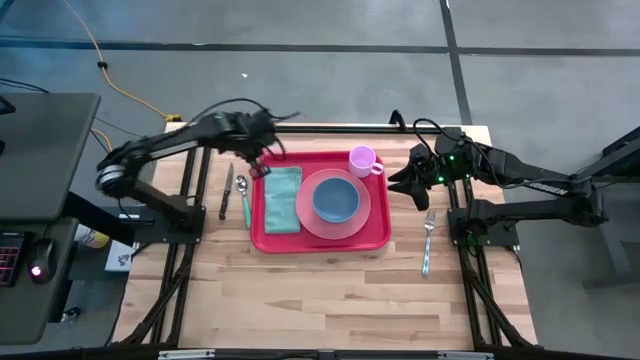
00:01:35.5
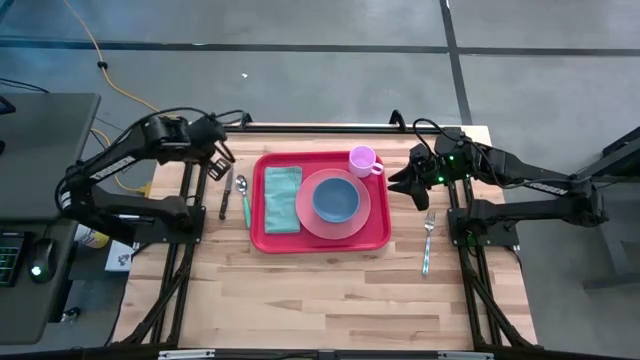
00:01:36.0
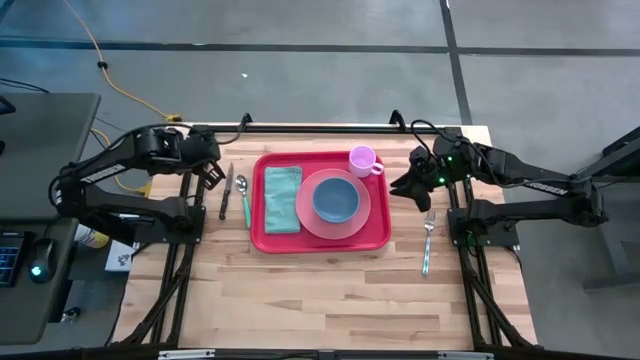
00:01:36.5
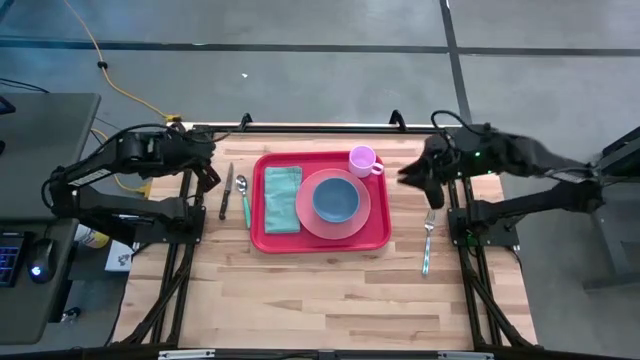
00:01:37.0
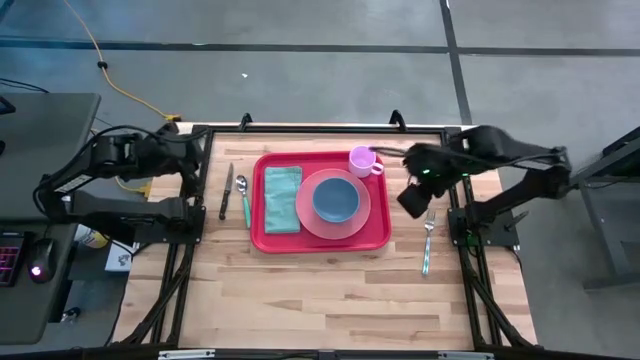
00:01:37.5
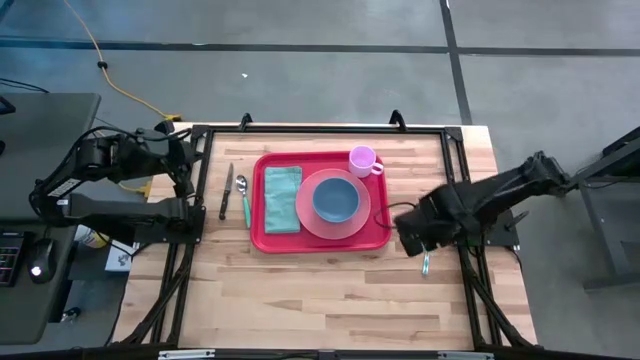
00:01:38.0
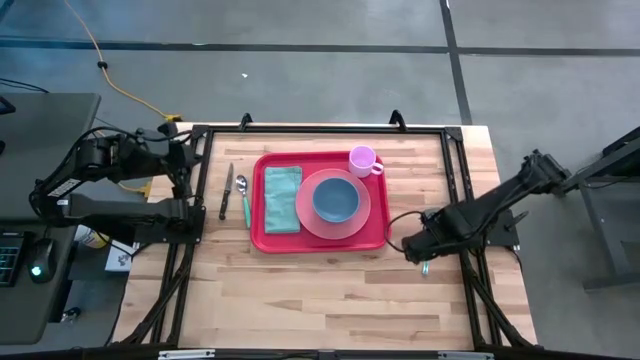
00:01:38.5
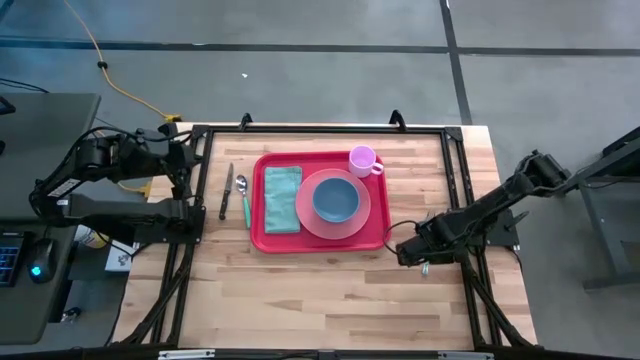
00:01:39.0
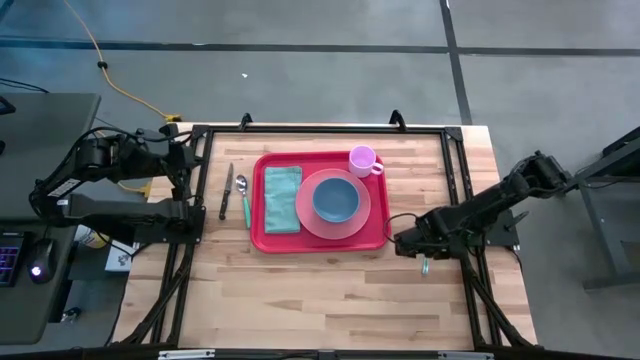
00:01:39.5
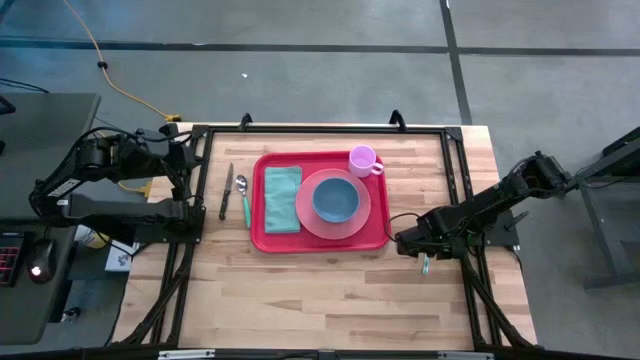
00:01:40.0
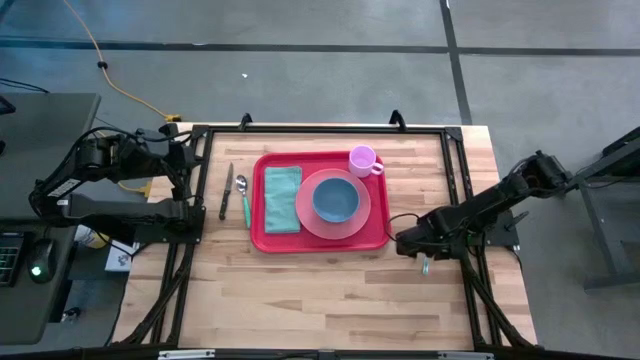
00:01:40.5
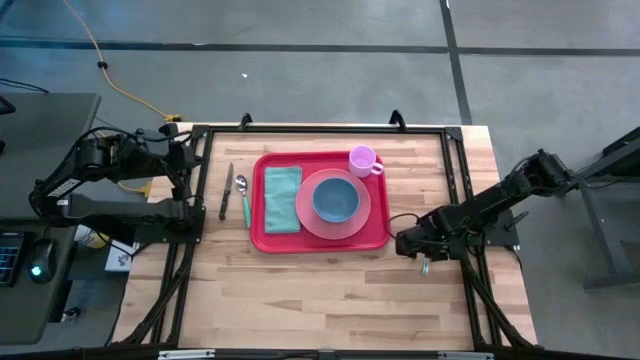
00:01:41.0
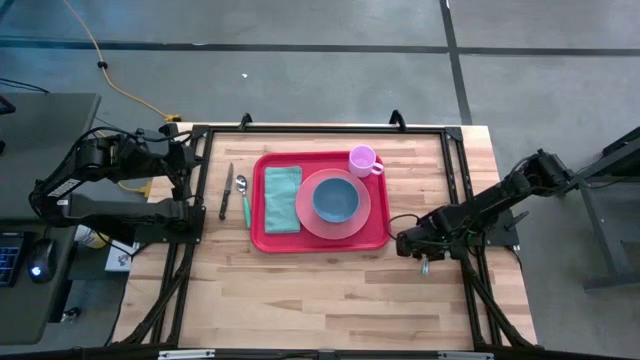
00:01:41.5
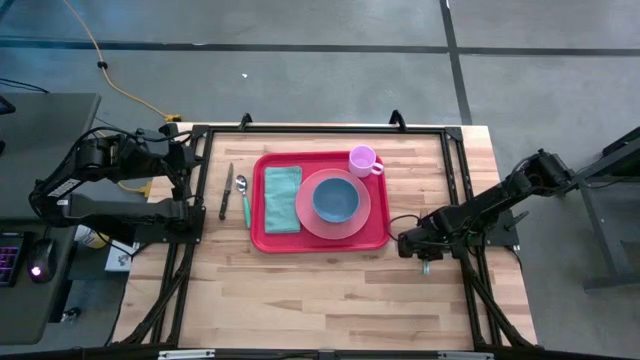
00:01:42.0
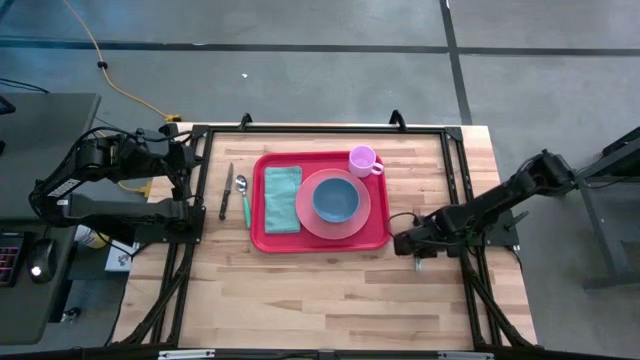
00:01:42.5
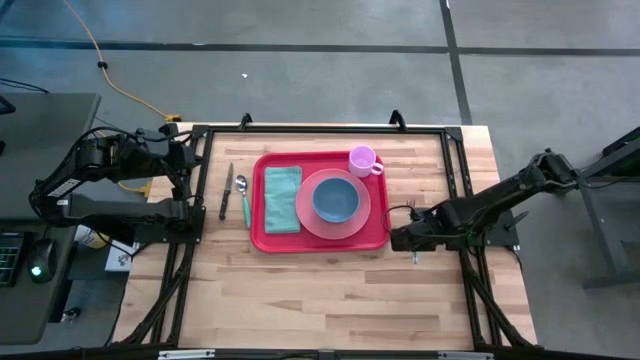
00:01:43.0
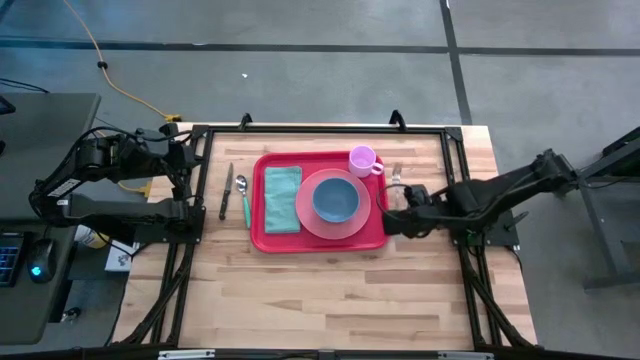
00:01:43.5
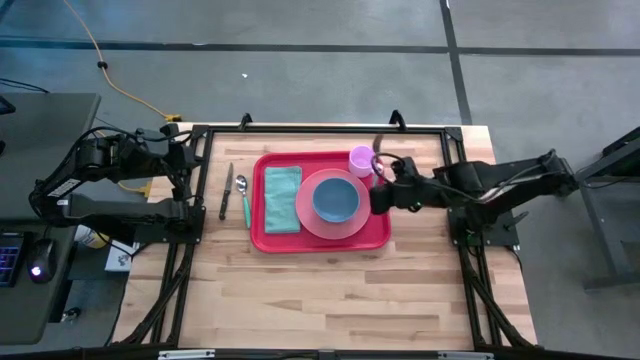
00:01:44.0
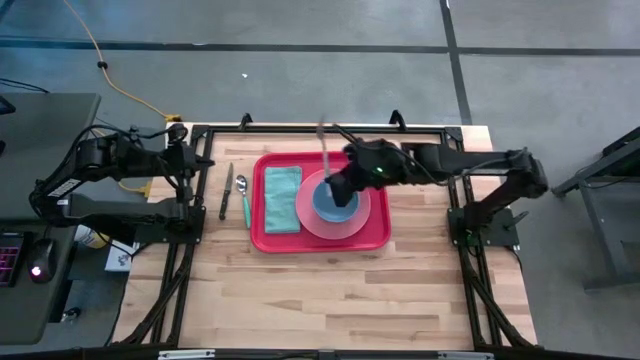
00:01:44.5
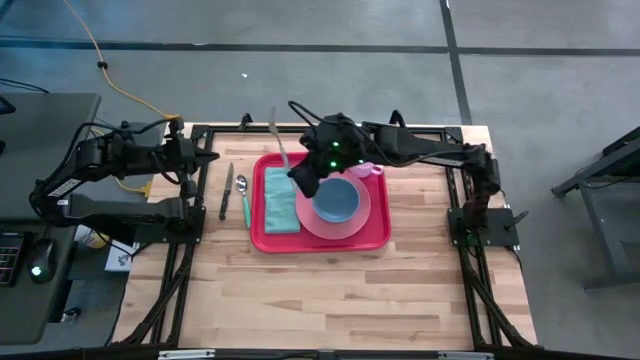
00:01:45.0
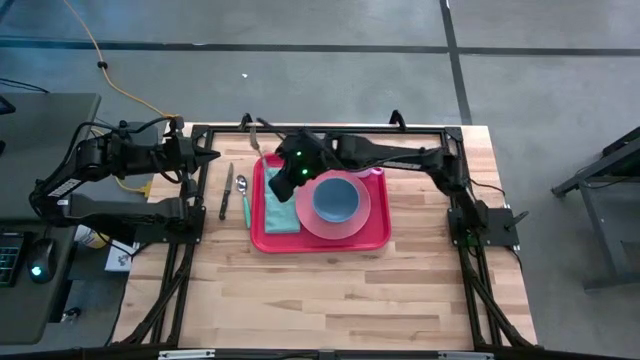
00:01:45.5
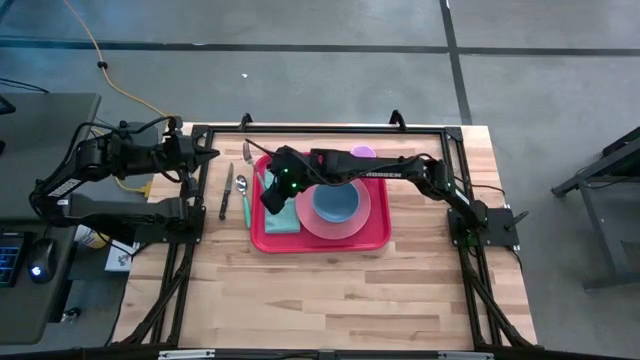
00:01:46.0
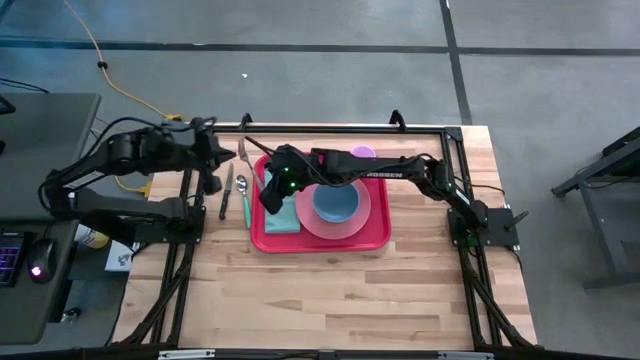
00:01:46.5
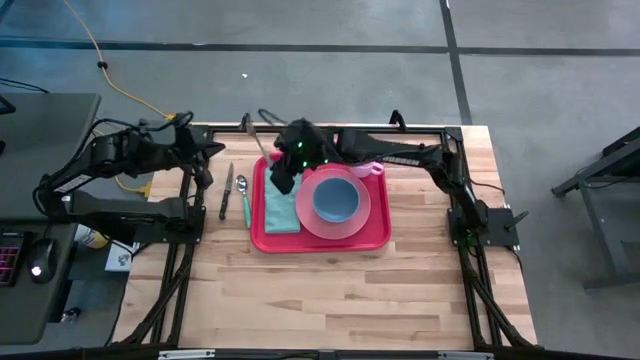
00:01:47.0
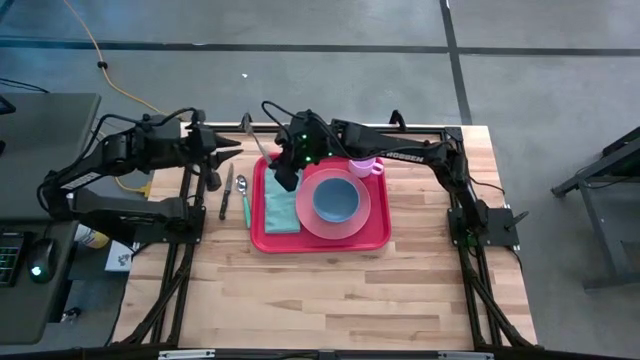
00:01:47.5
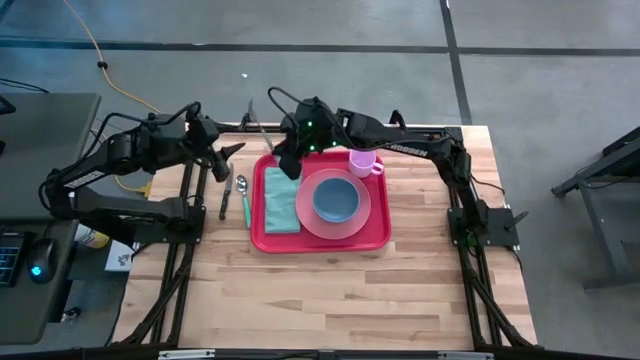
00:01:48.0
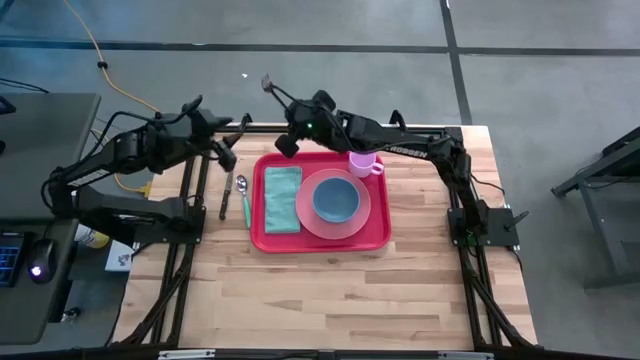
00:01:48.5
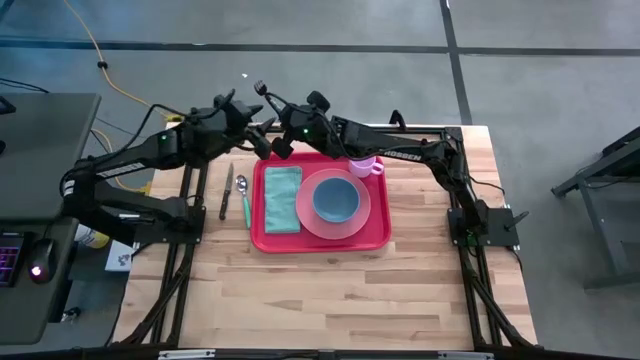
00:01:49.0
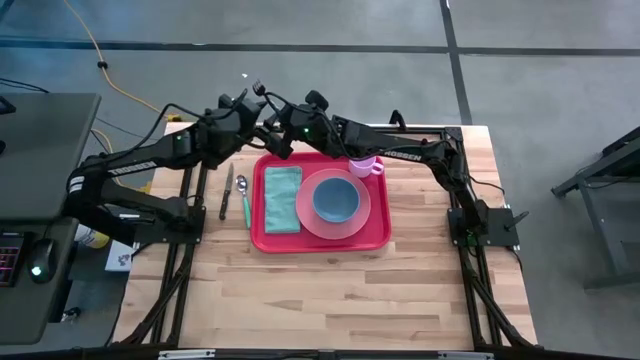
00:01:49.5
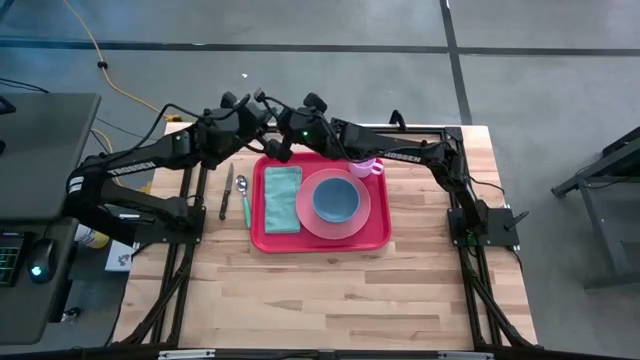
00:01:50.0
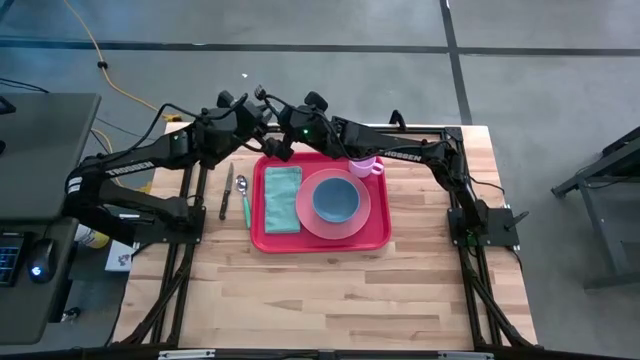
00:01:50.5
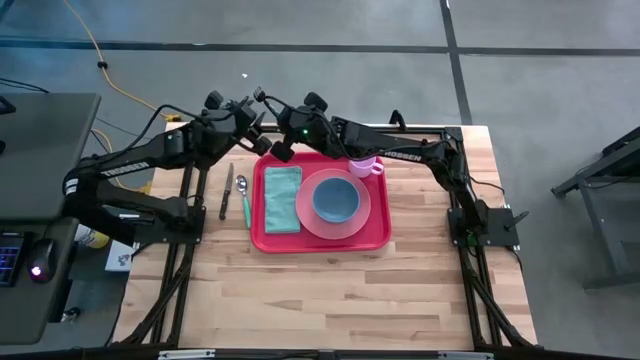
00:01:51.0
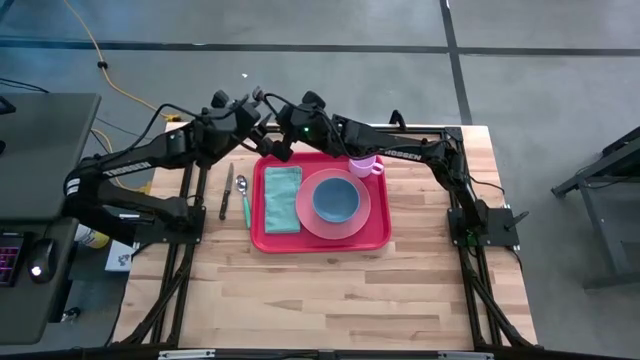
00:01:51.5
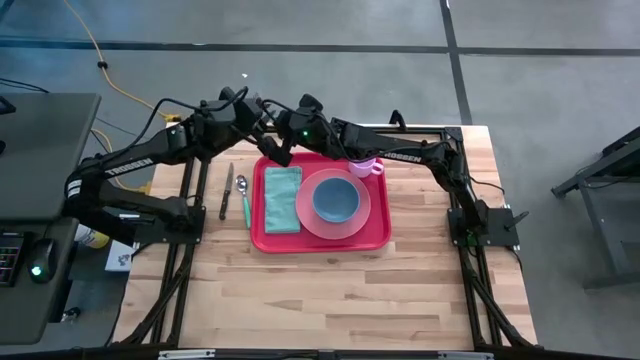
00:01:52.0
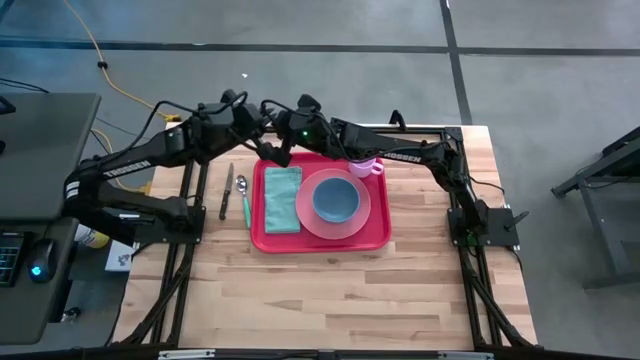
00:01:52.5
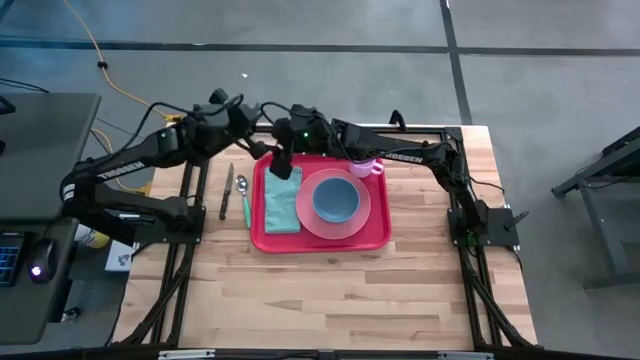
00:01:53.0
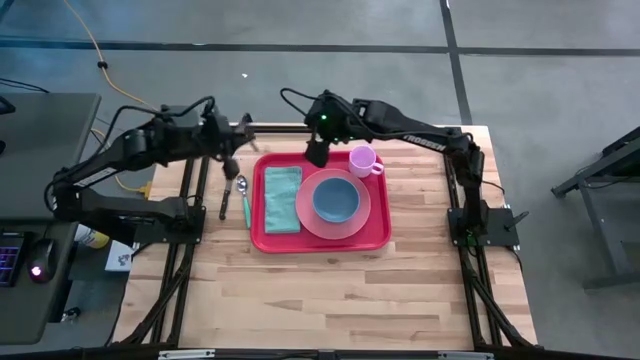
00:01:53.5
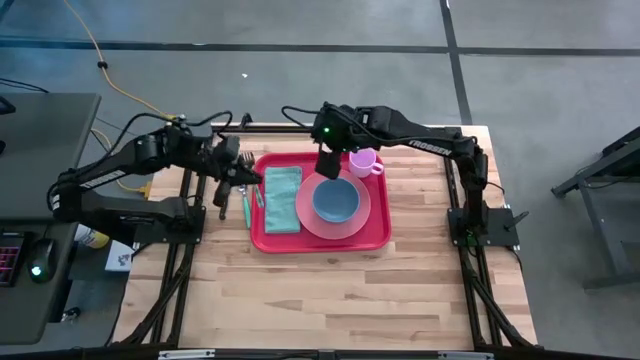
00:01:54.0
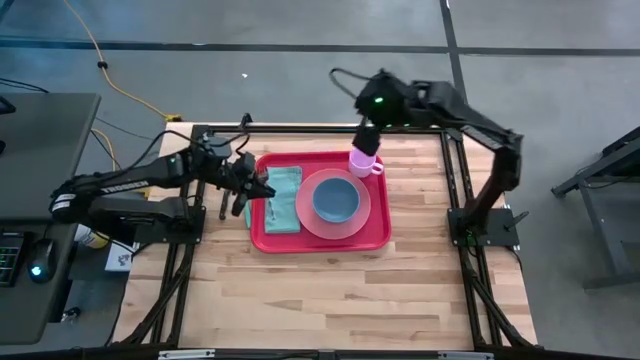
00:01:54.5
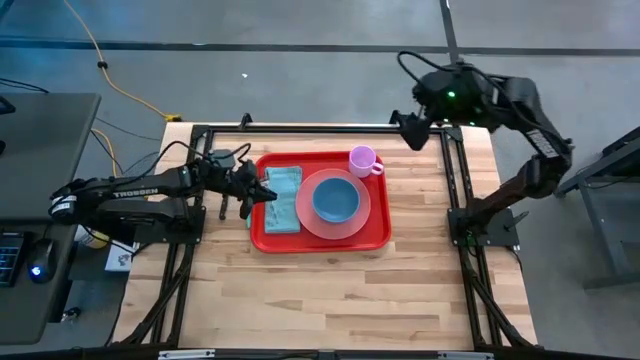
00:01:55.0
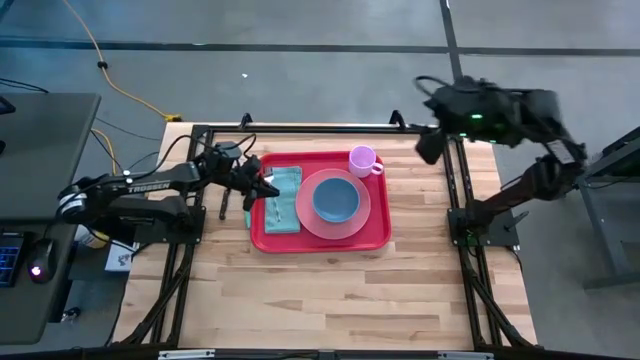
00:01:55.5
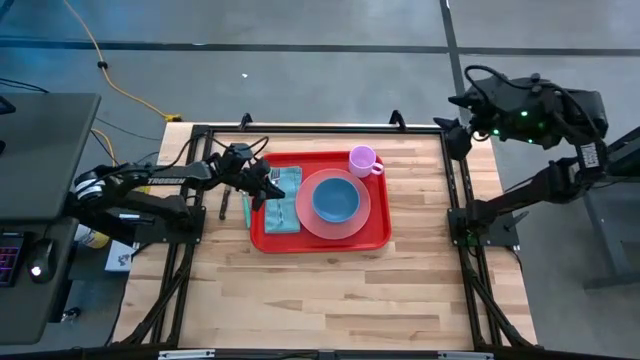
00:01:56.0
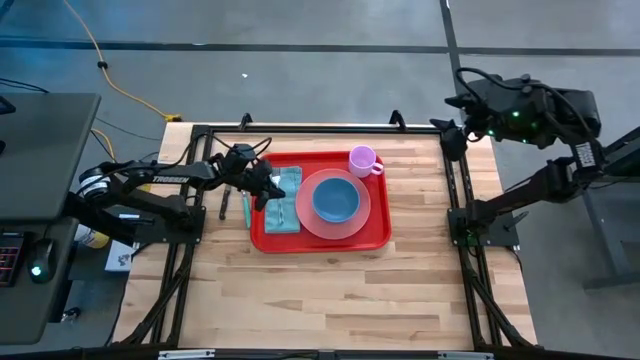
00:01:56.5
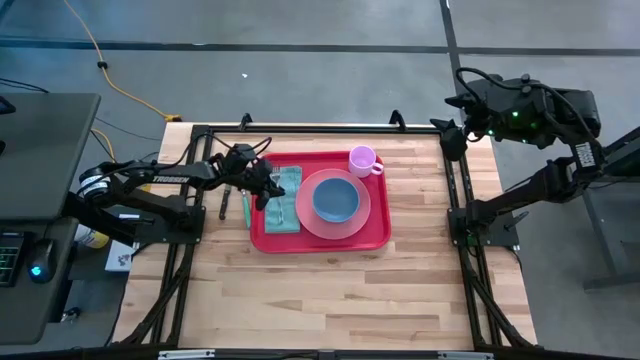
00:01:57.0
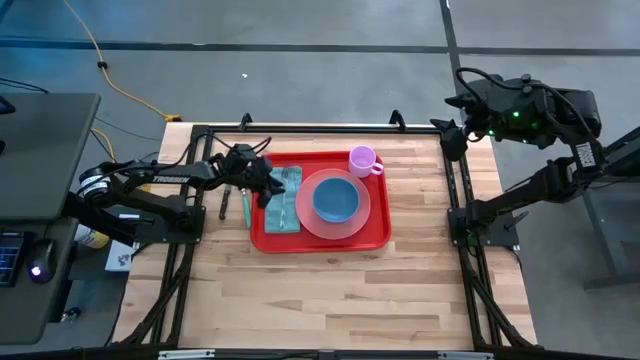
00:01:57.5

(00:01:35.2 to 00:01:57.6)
Task: Set up tray
Put the fork on the blue towel on the tray
